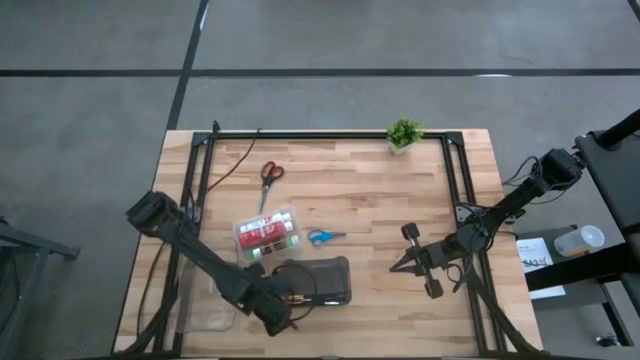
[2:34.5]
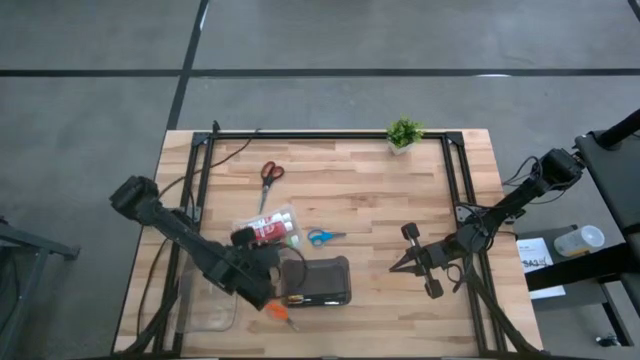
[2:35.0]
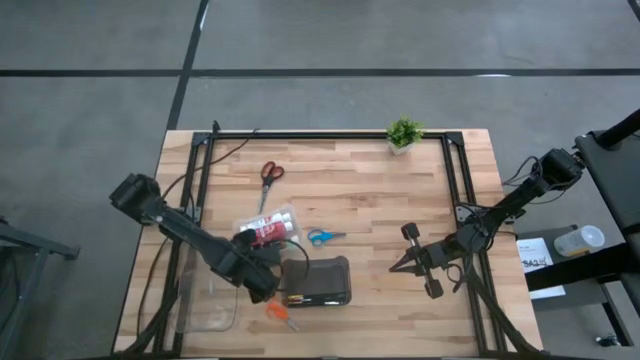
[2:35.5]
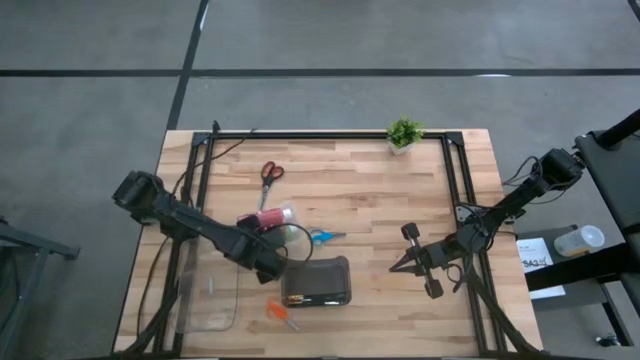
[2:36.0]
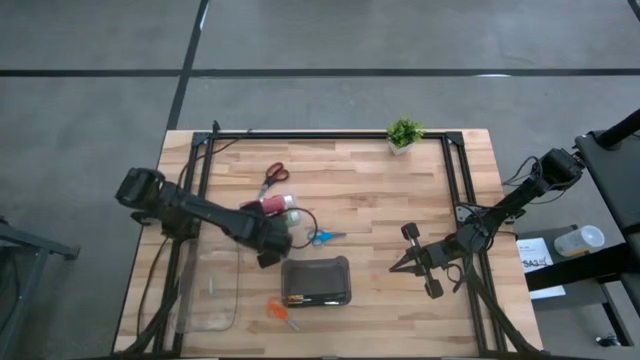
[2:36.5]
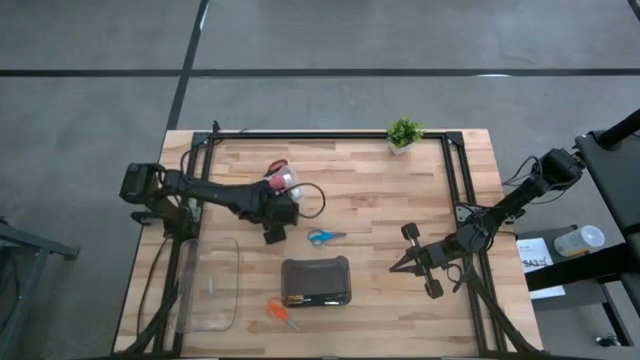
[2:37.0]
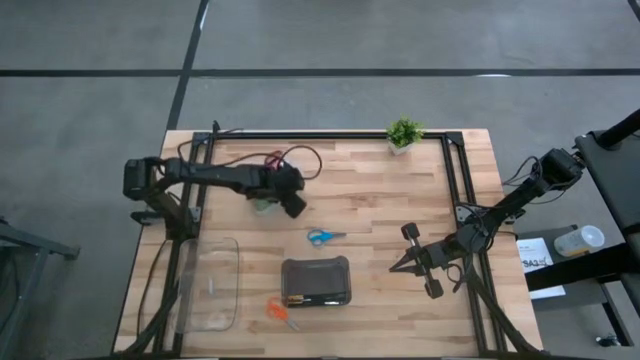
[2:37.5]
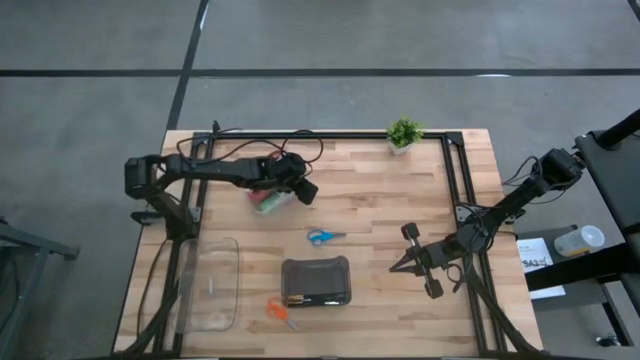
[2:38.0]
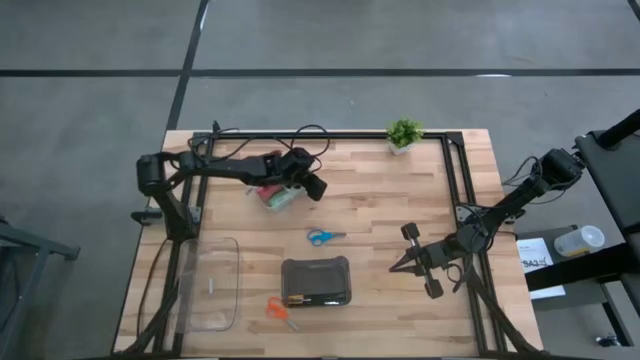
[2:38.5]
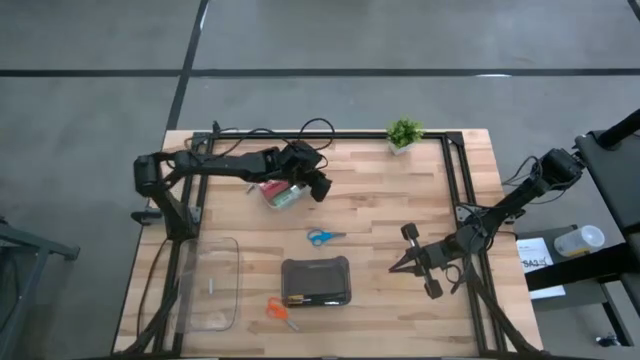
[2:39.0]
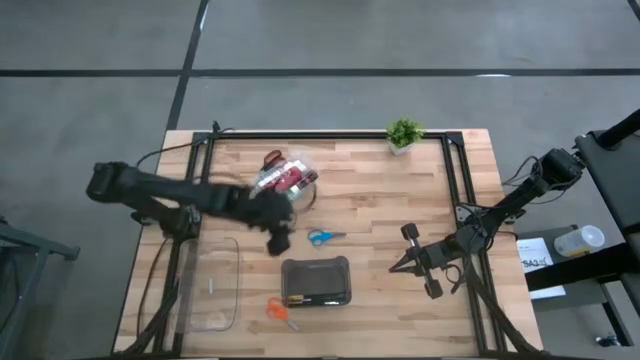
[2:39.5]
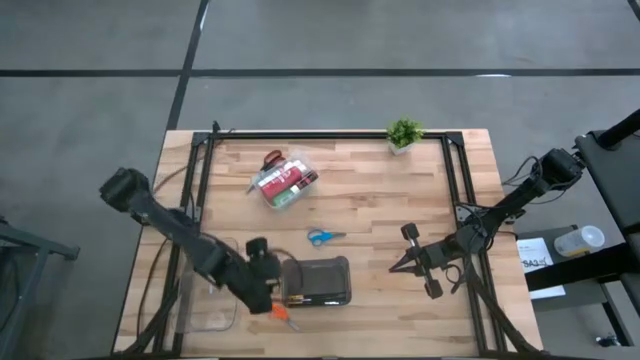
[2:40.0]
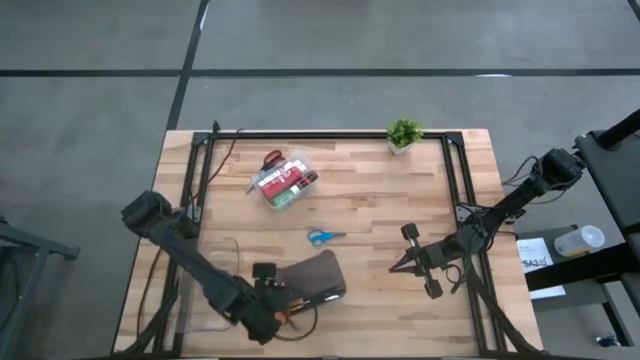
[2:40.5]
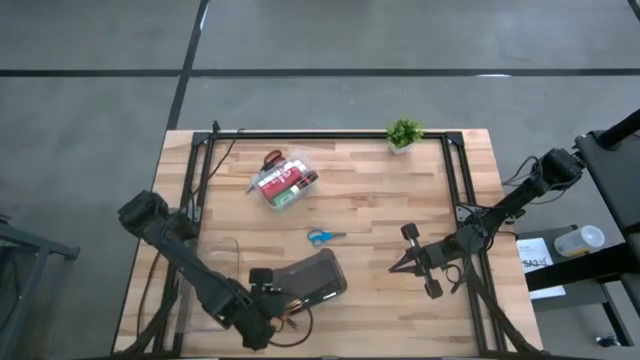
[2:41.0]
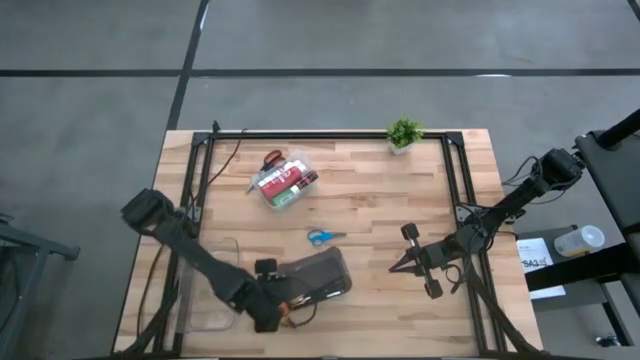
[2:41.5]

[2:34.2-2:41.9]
Task: Pick & Place Paint Supplies
Adjust the bins on the table

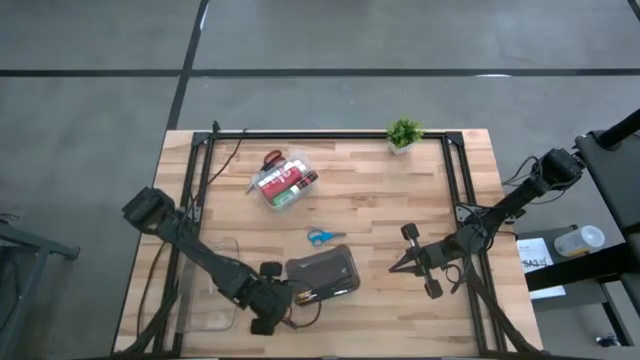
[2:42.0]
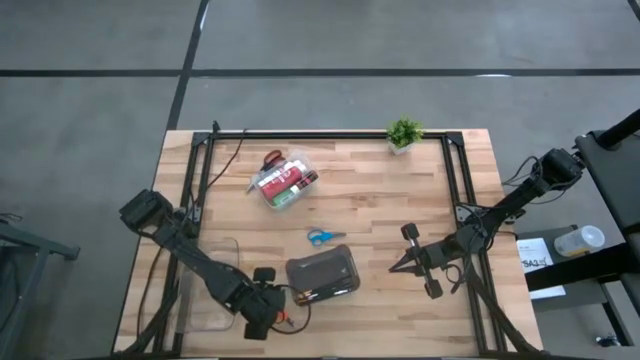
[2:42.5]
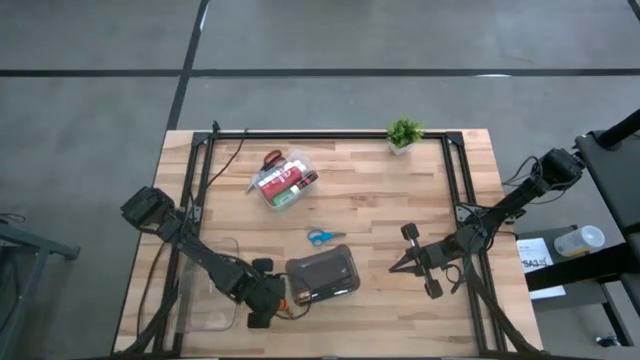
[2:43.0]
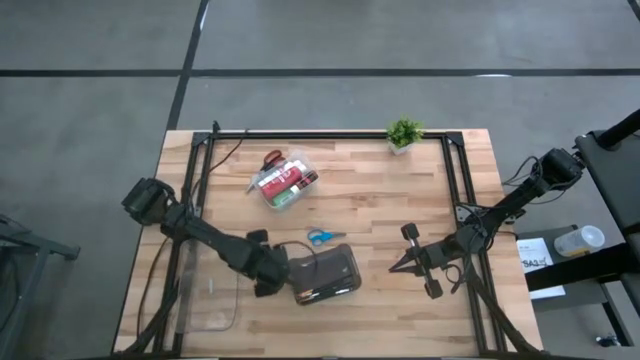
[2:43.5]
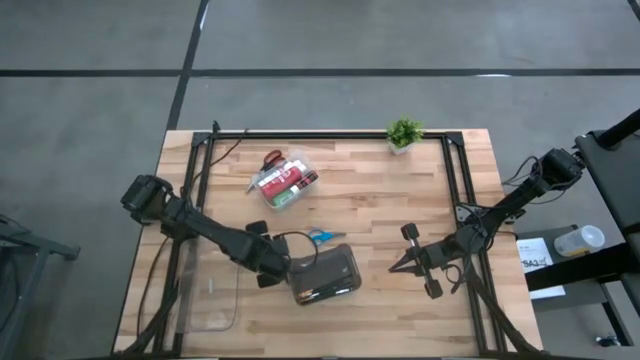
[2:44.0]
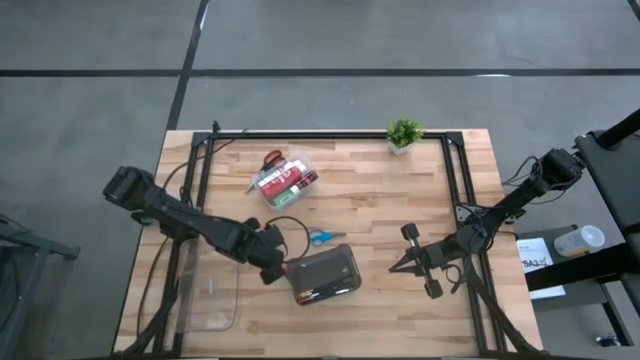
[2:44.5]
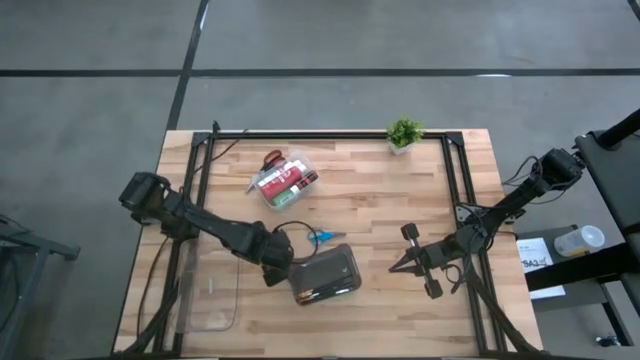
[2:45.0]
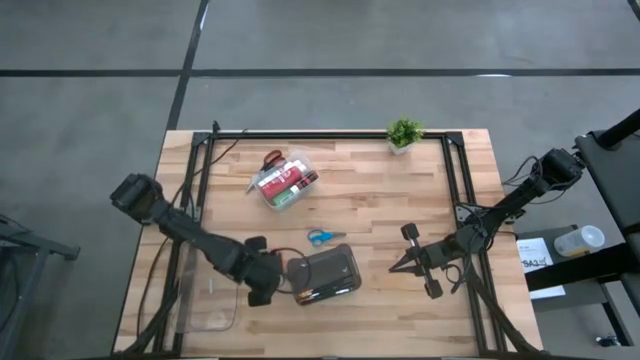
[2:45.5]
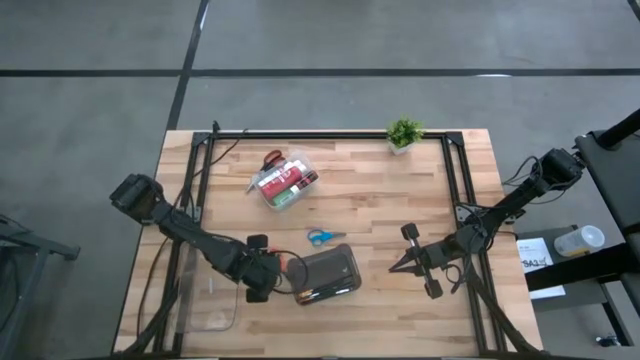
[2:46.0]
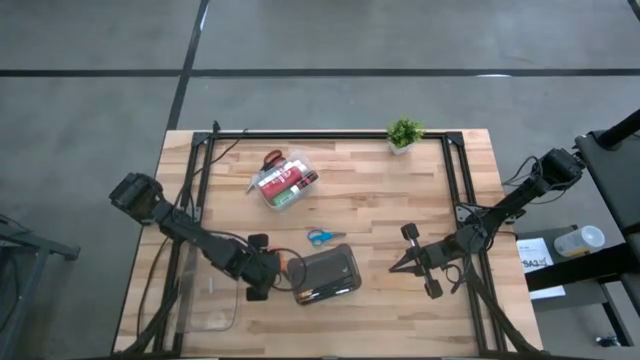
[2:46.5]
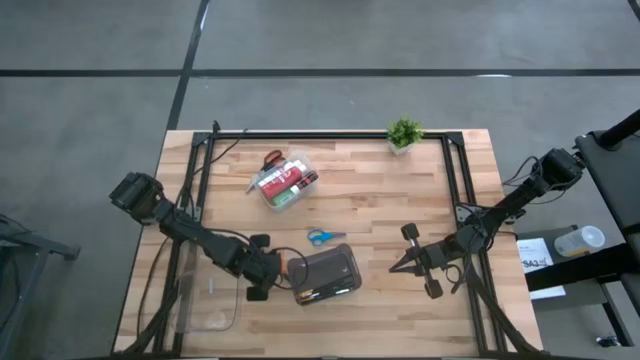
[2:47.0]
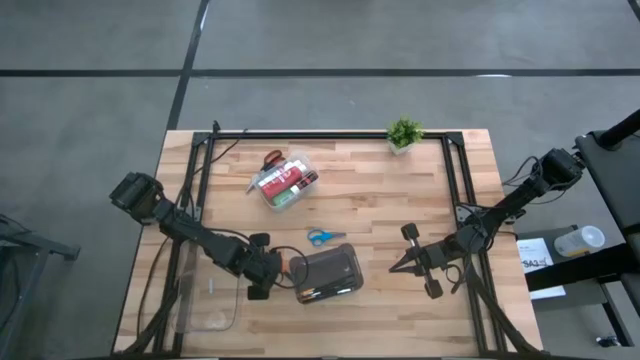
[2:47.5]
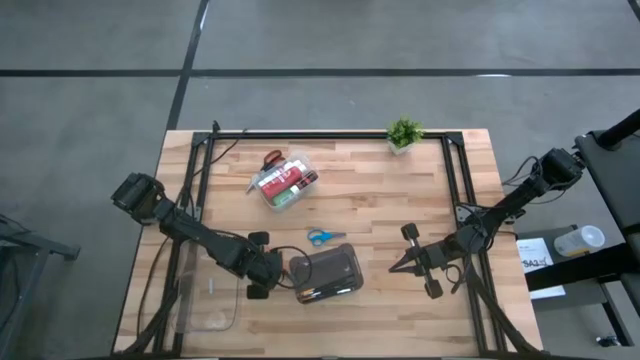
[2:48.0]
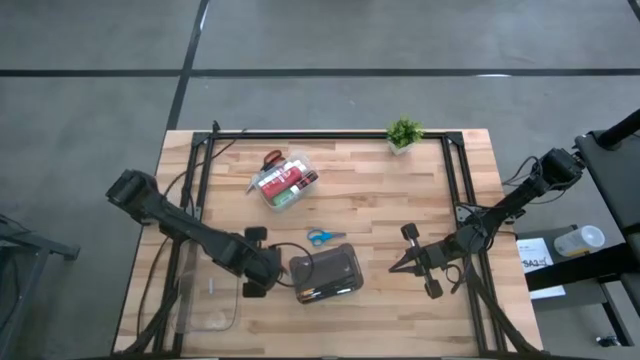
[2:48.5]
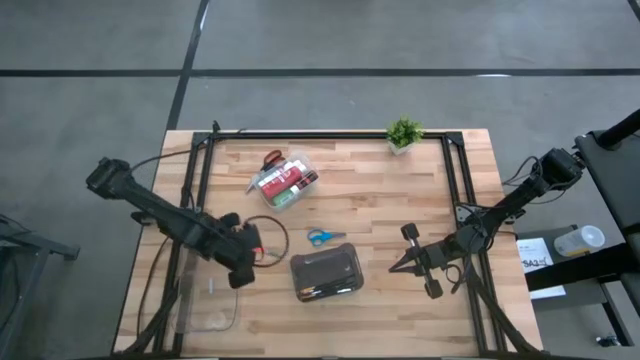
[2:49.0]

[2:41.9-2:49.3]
Put the orange scissors into the bottom transparent bin

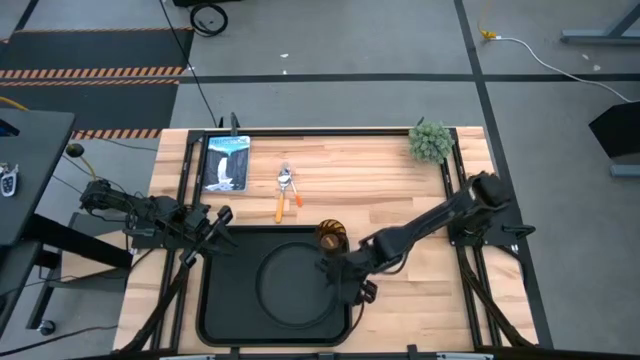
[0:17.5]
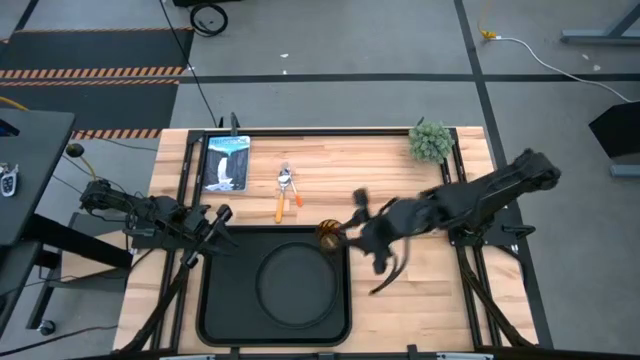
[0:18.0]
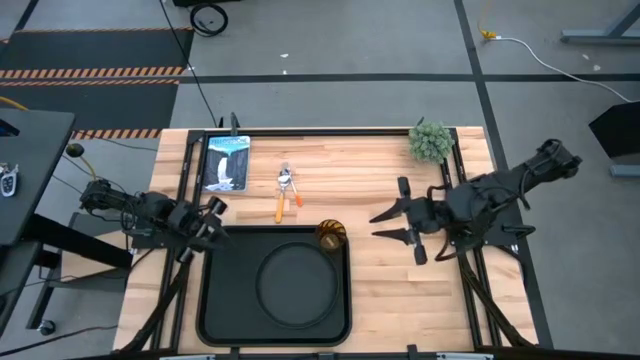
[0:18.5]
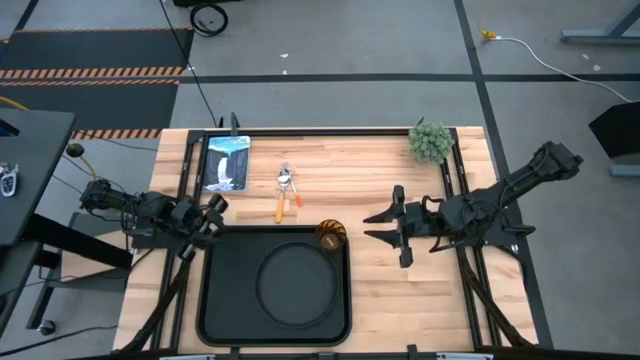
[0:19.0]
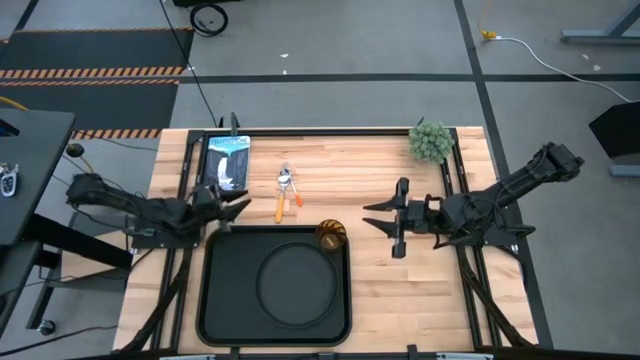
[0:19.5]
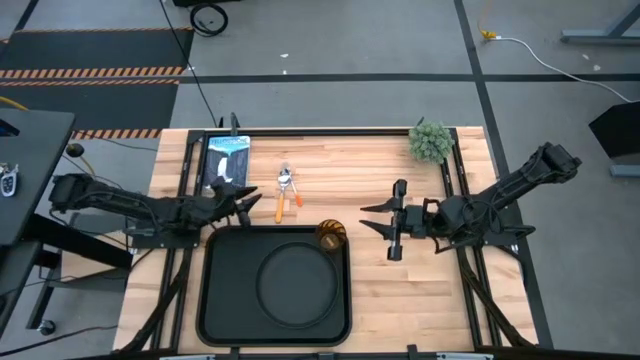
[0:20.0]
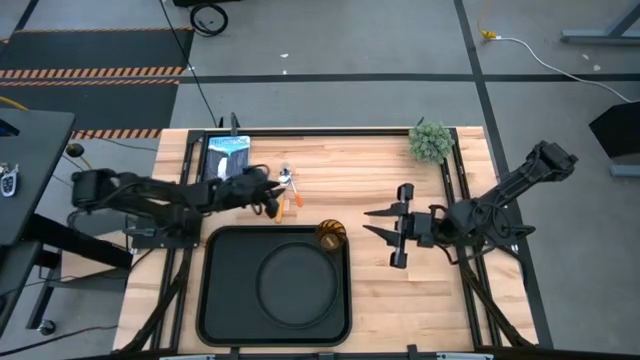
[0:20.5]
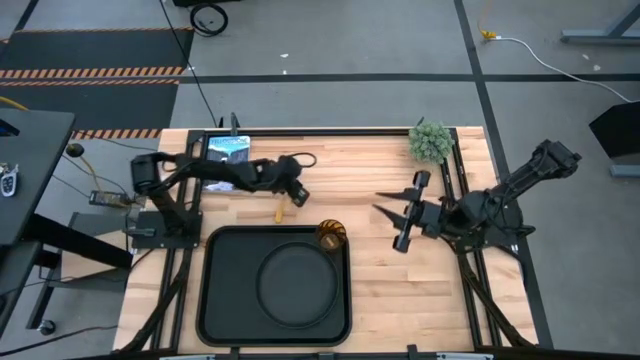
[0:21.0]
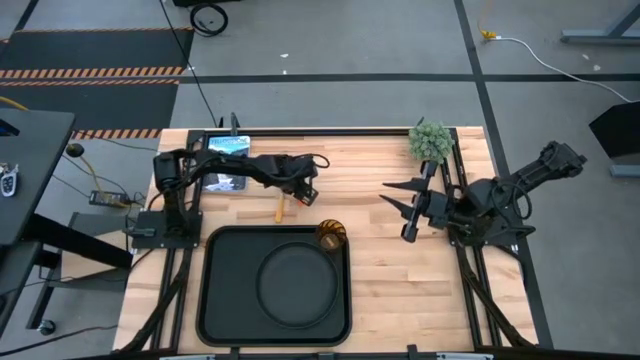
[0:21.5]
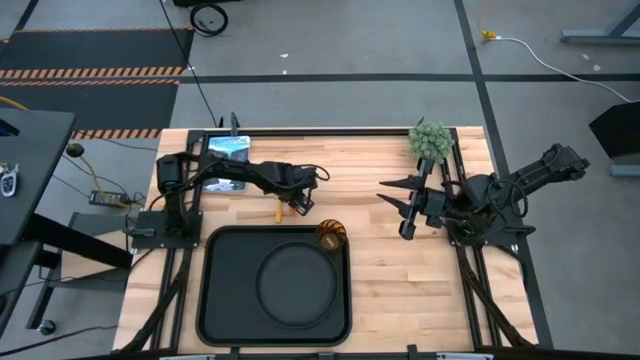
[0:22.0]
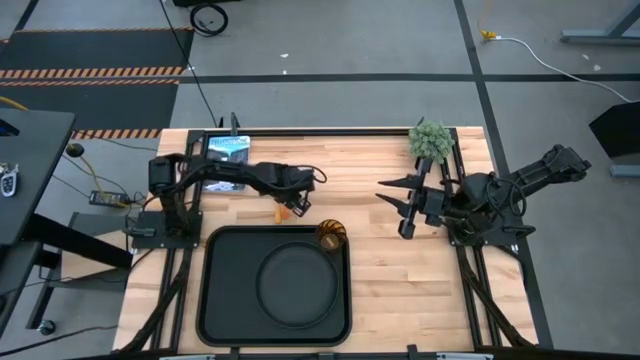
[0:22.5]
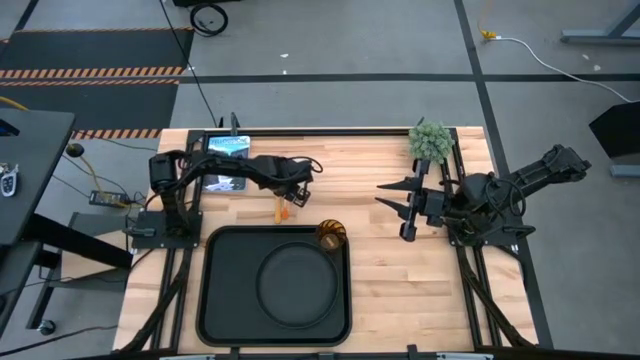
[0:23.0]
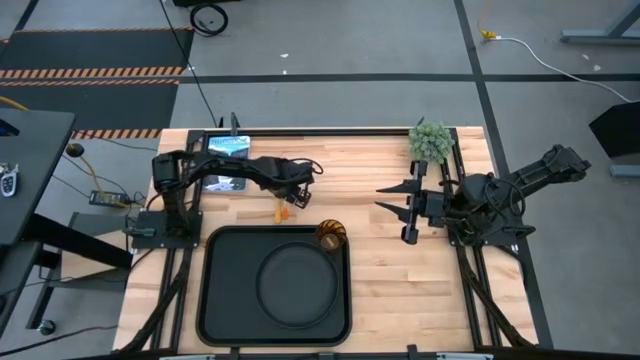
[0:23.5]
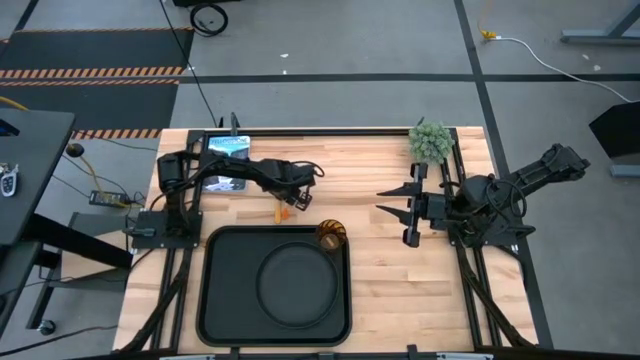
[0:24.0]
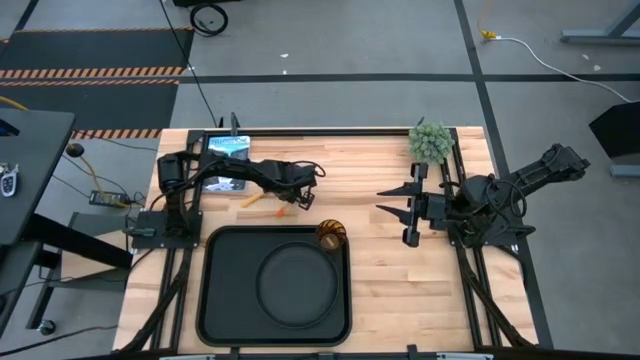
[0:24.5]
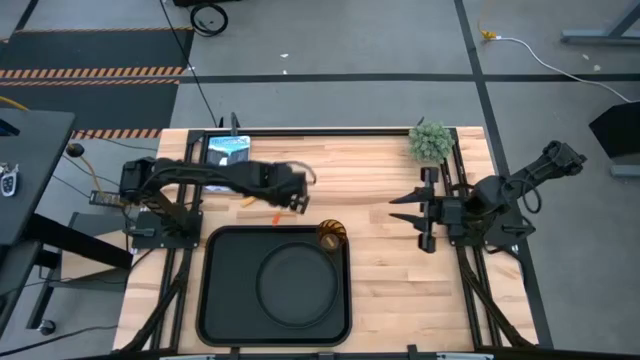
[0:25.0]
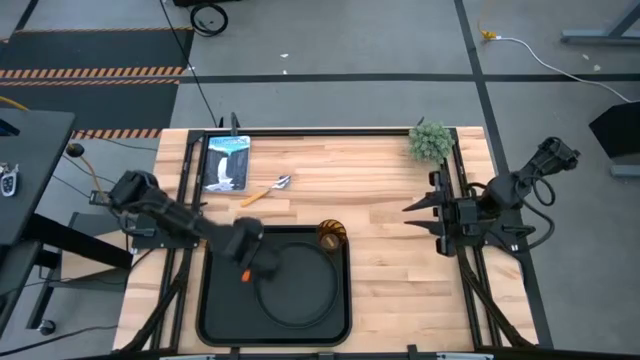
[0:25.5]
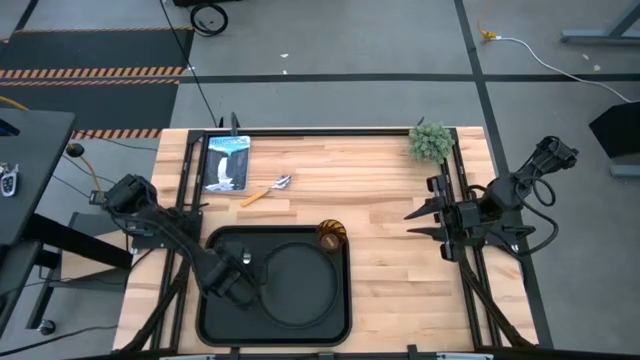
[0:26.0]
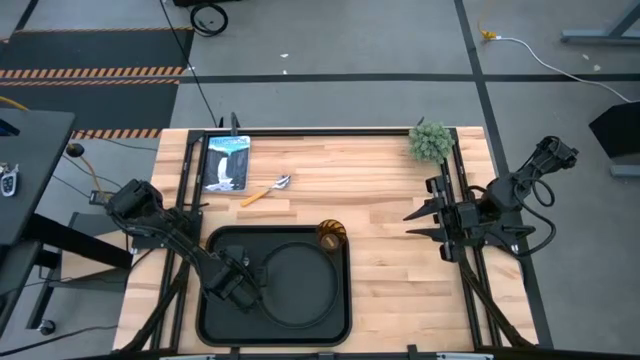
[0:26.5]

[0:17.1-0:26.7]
Task: Pick and place plate/cup/fork/spoon on tray
Put the orange fork to the left of the black plate on the black serving tray
